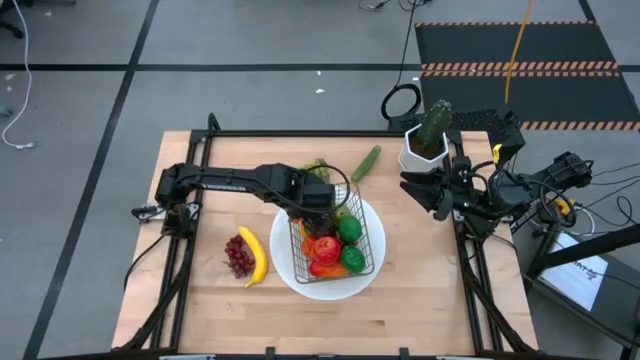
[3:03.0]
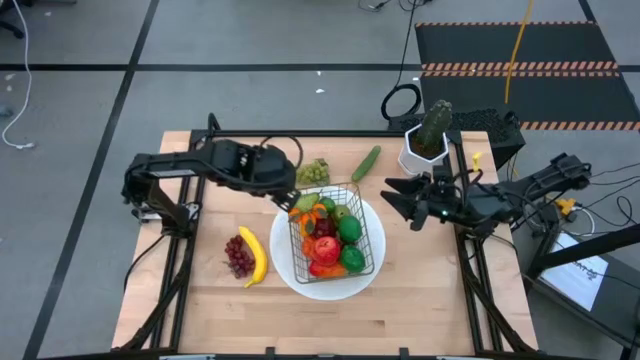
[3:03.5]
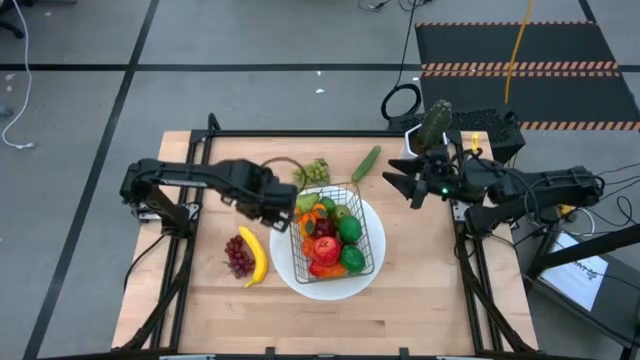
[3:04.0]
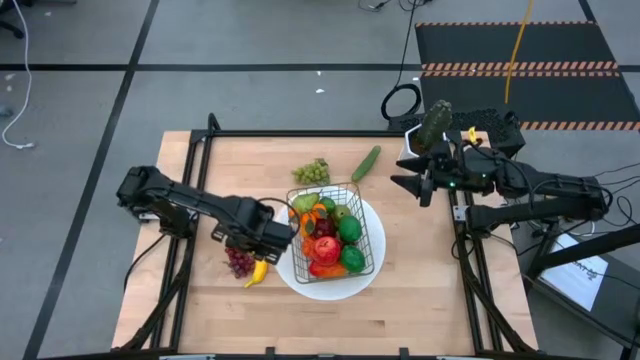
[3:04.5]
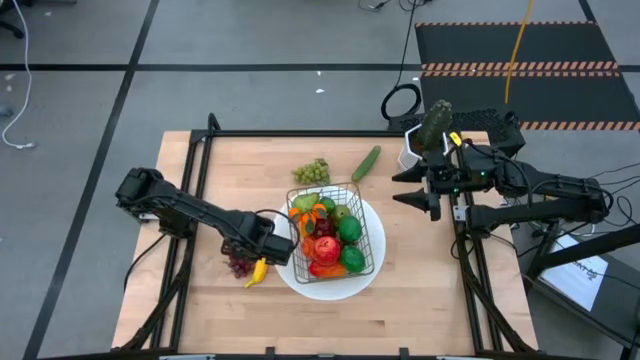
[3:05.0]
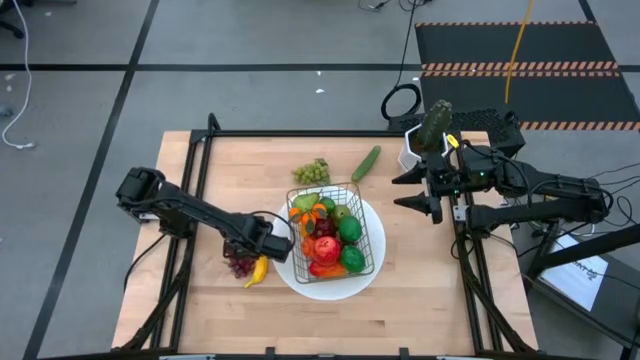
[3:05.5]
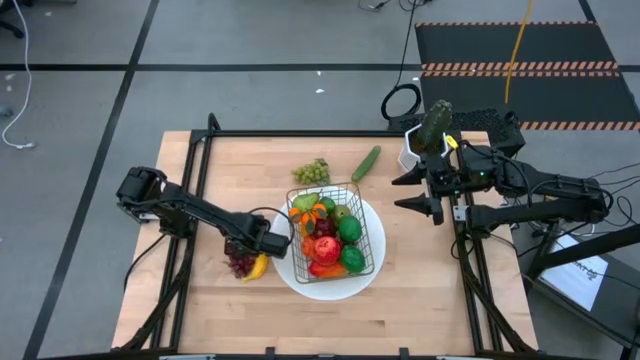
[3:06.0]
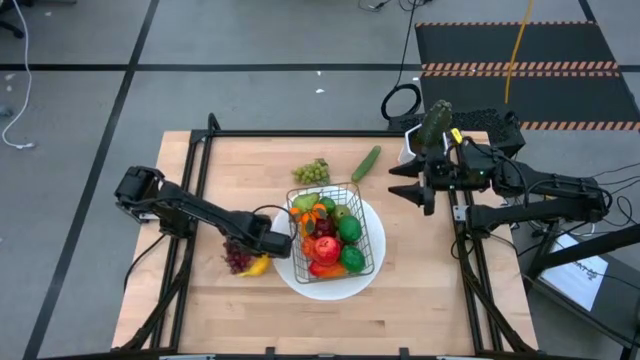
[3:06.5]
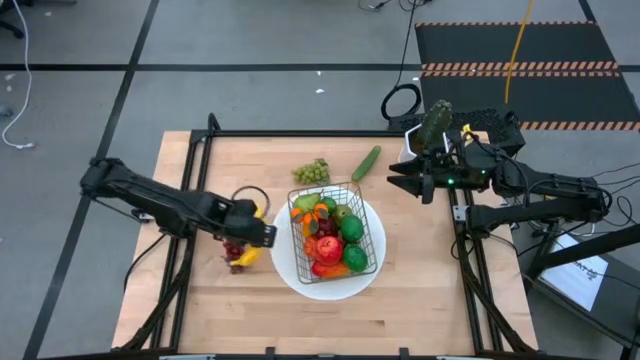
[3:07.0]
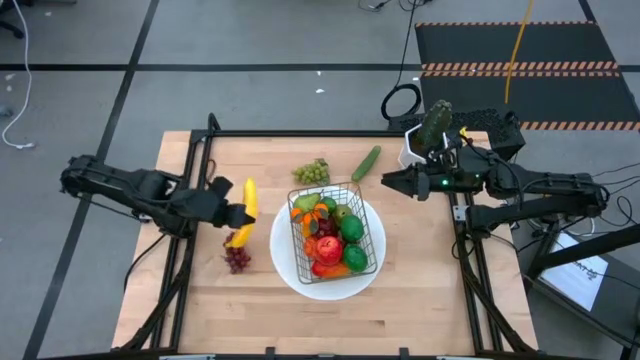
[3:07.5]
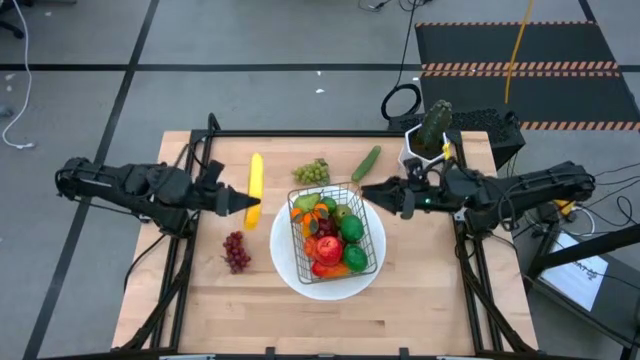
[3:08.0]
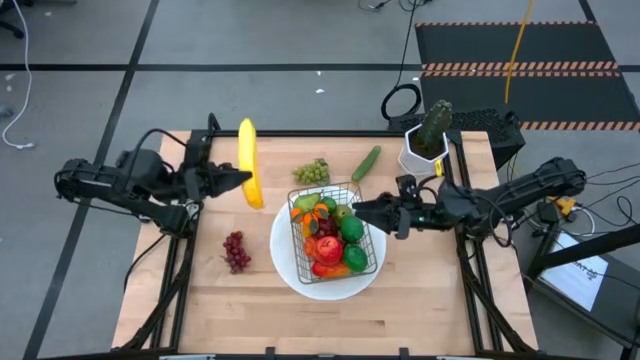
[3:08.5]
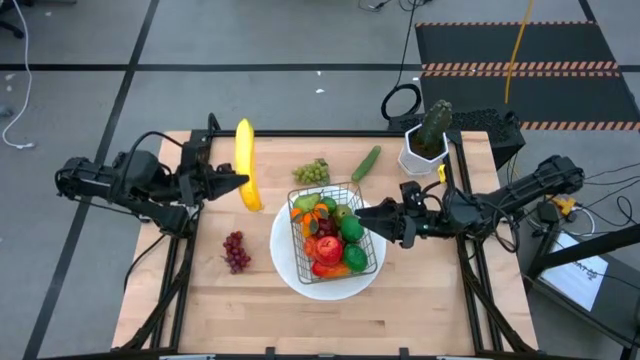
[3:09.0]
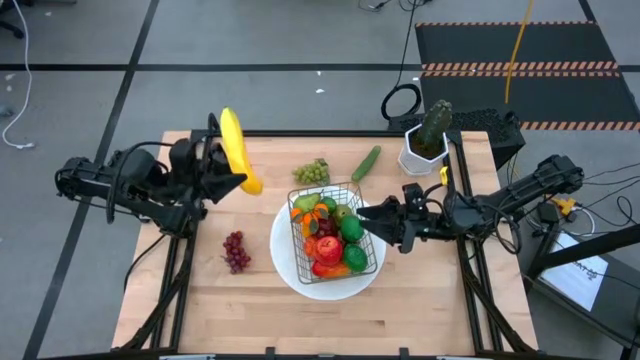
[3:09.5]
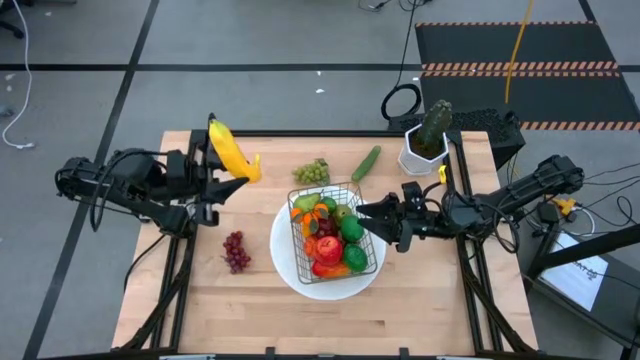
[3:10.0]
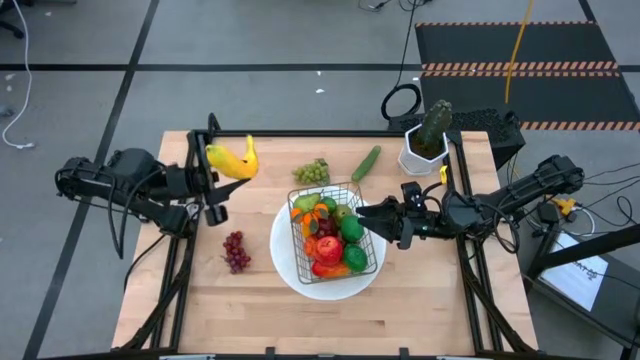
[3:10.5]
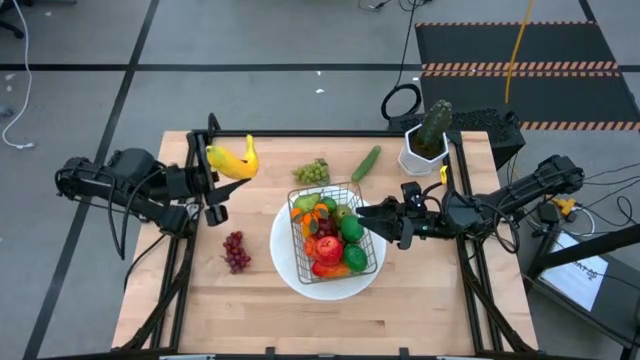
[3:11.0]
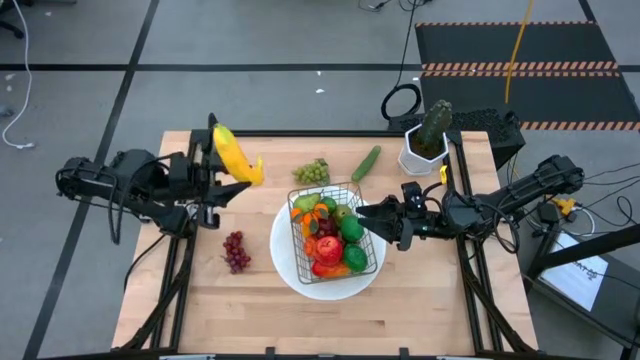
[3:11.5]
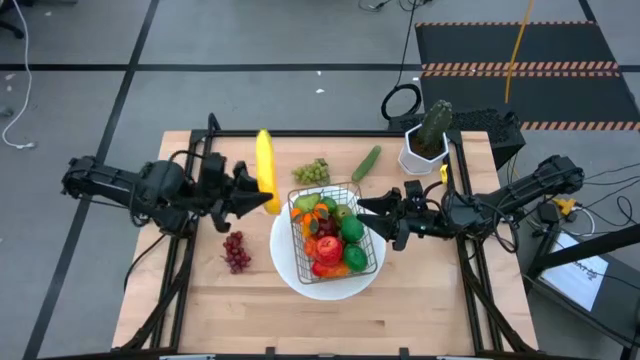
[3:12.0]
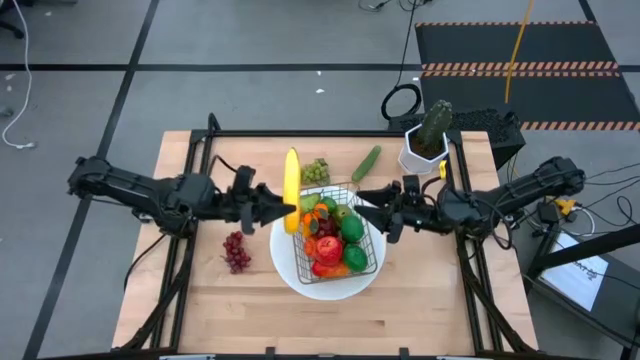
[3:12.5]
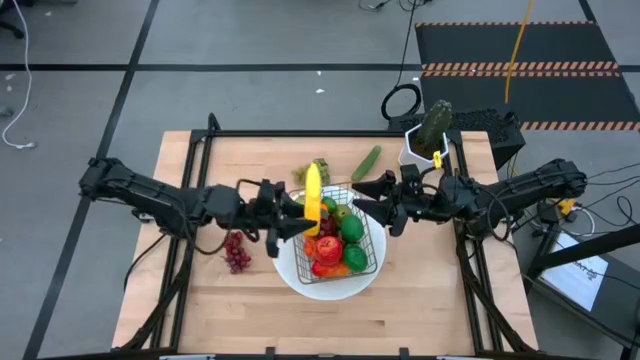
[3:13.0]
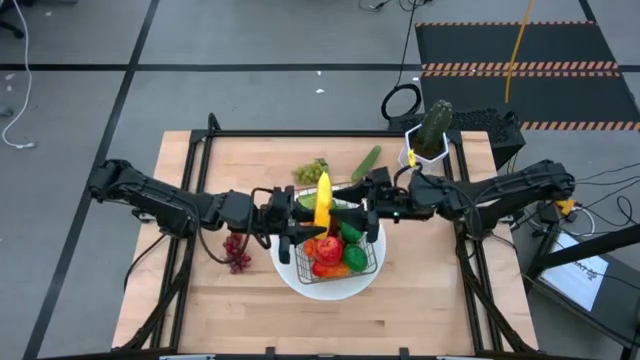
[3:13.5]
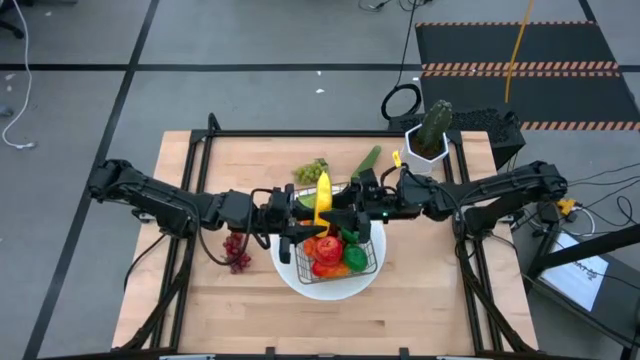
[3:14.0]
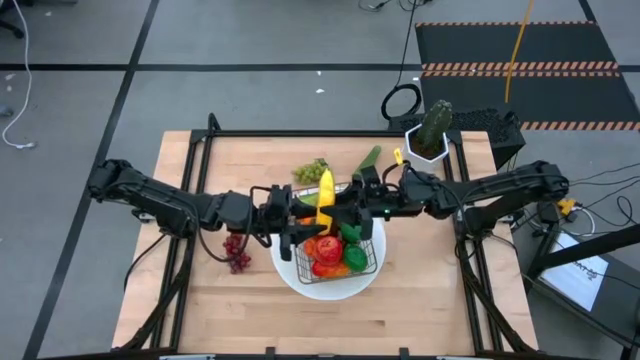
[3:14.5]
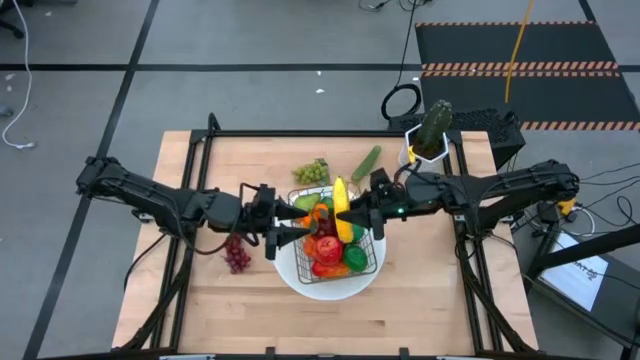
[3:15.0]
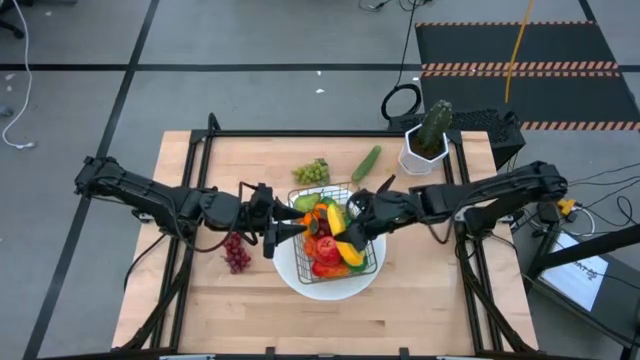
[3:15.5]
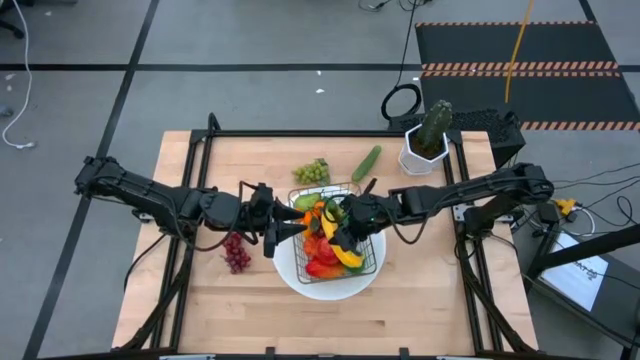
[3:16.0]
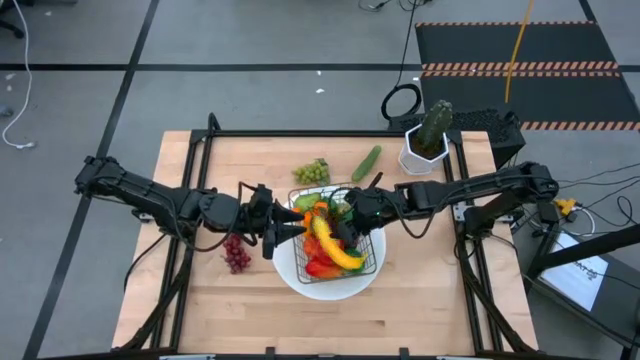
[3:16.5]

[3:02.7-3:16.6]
Task: Build produce basket
Put the yellow banana into the black wire basket

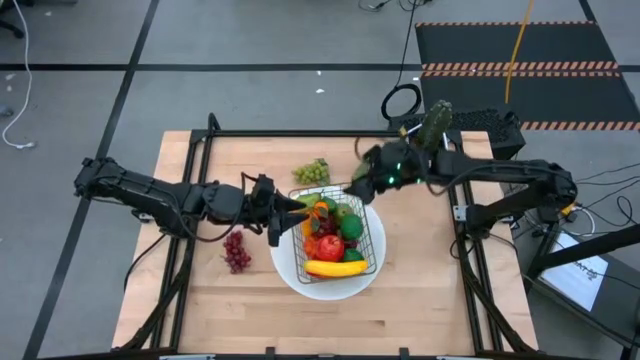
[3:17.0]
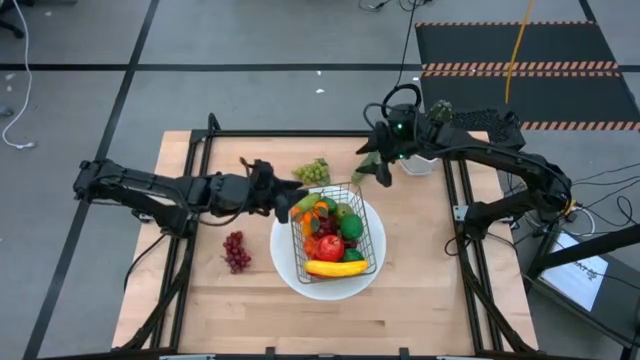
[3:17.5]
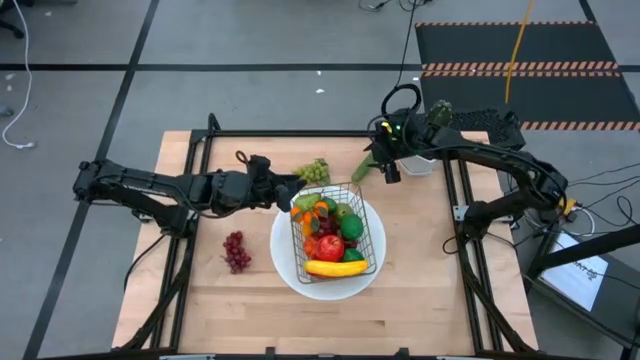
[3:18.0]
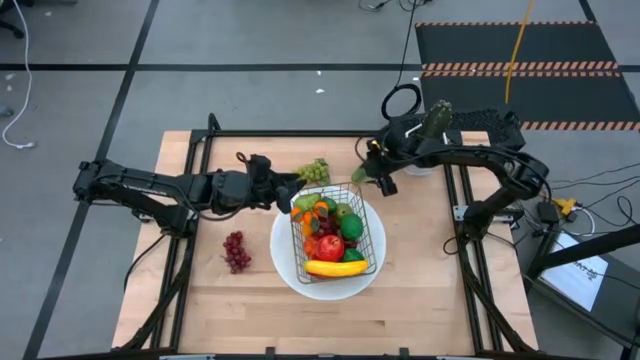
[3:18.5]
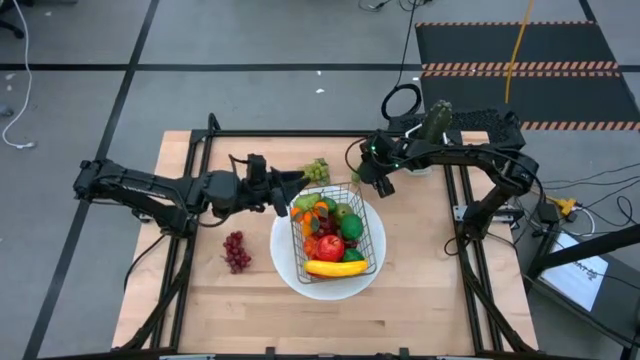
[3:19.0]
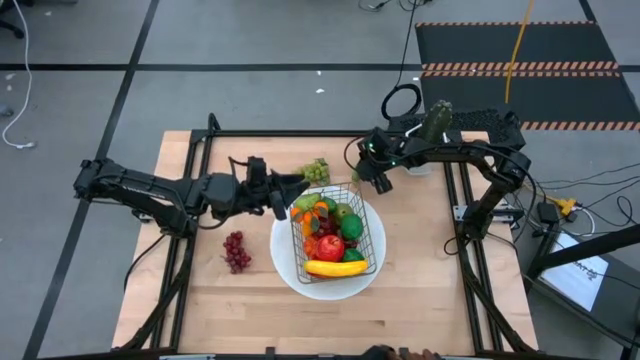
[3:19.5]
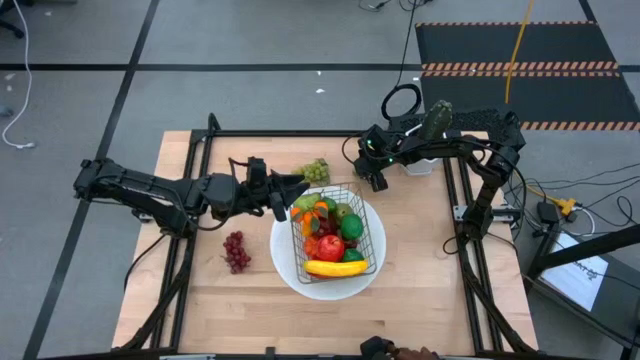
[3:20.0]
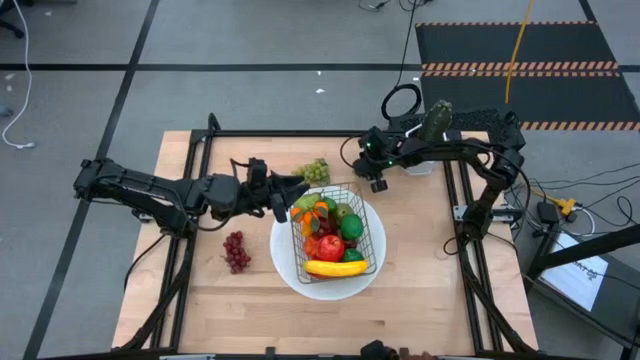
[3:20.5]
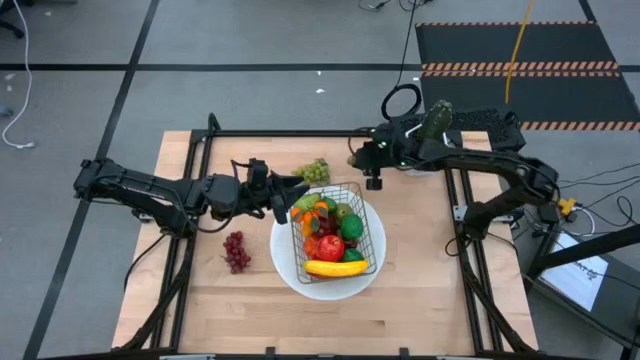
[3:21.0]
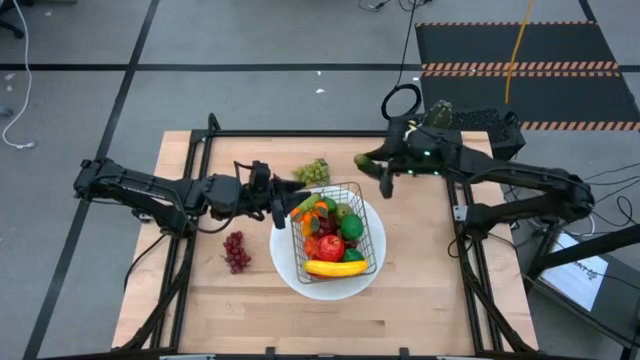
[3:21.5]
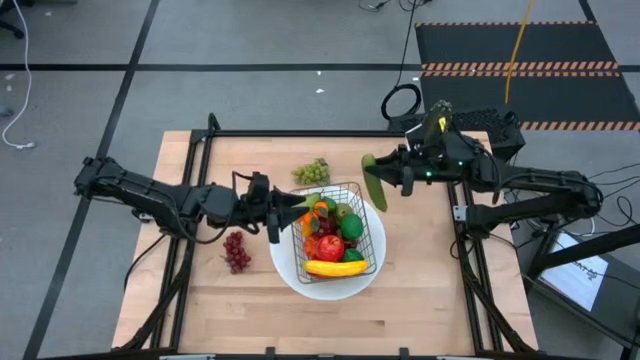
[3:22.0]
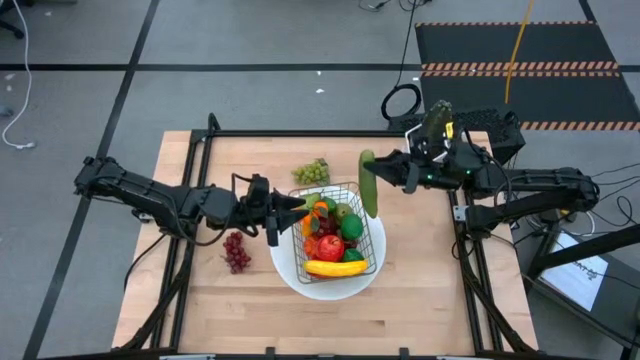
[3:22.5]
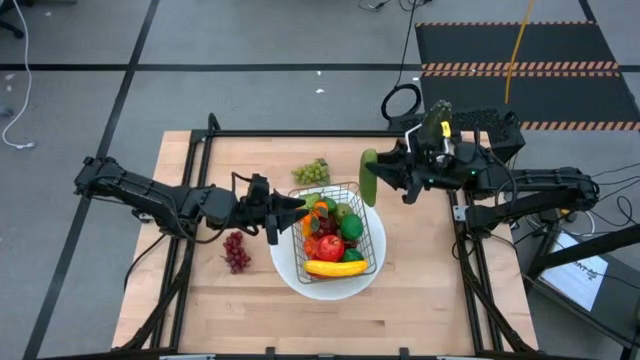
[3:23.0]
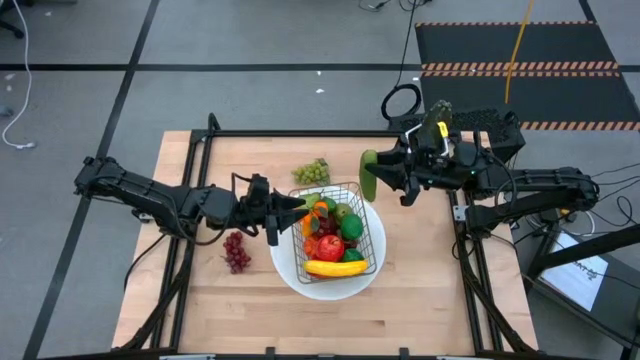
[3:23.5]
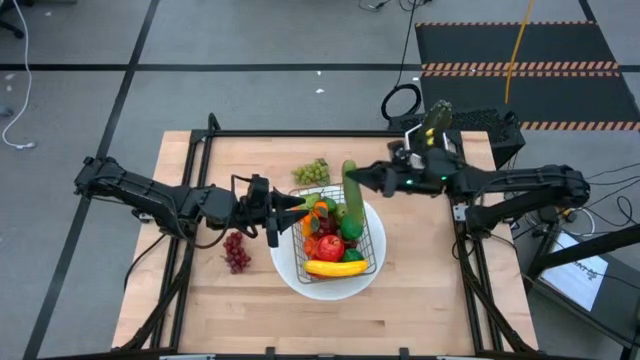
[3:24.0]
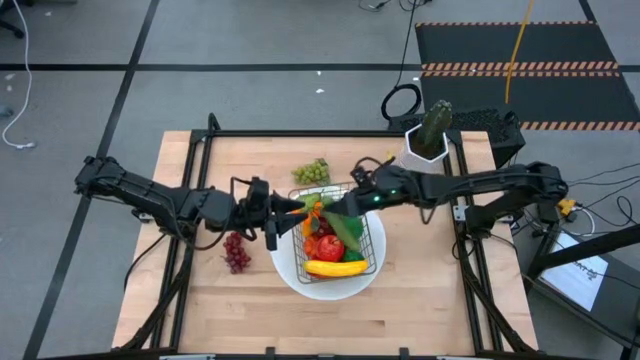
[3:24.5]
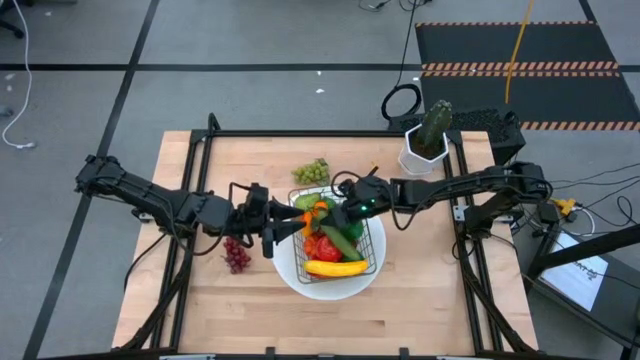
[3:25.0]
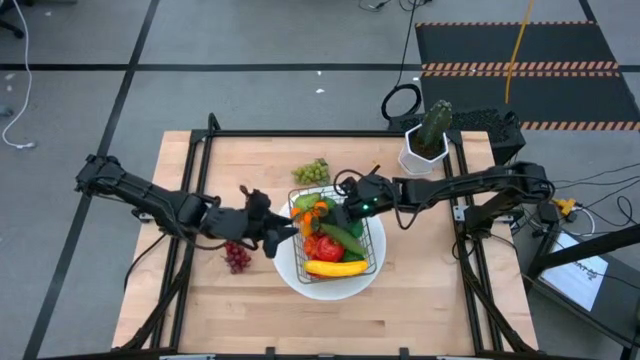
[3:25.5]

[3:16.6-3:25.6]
Put the green cucumber into the black wire basket
